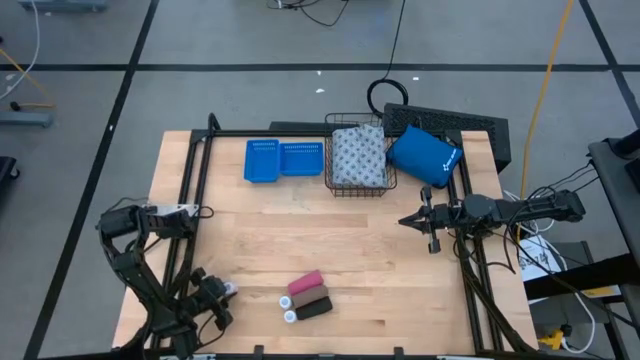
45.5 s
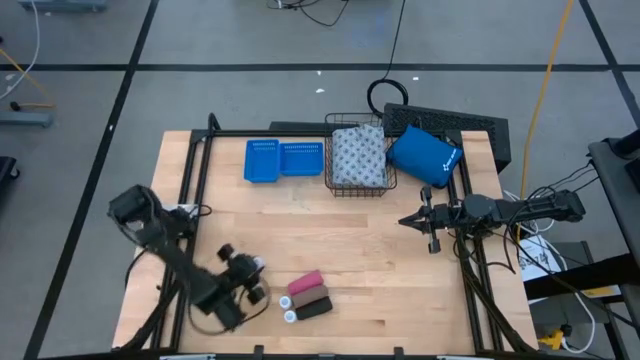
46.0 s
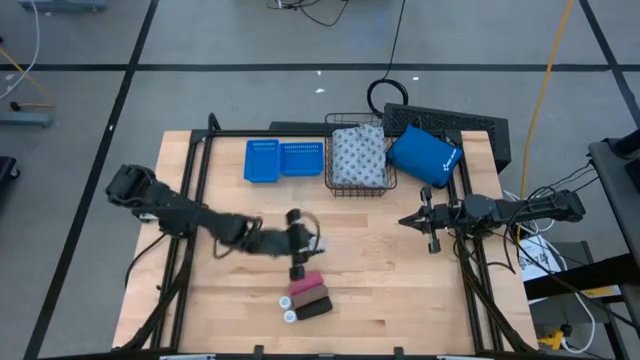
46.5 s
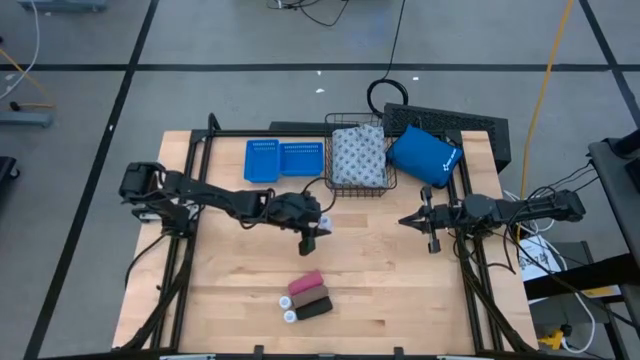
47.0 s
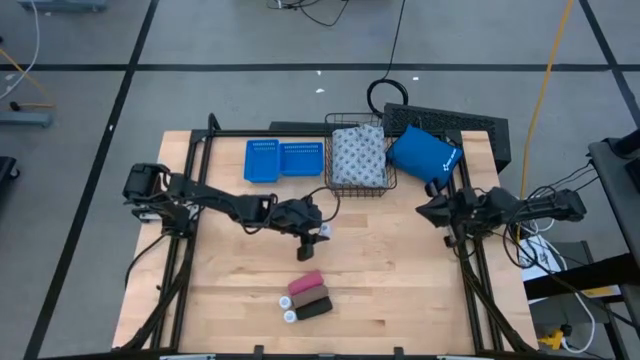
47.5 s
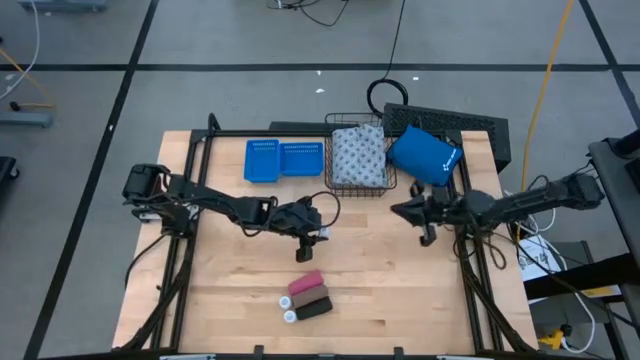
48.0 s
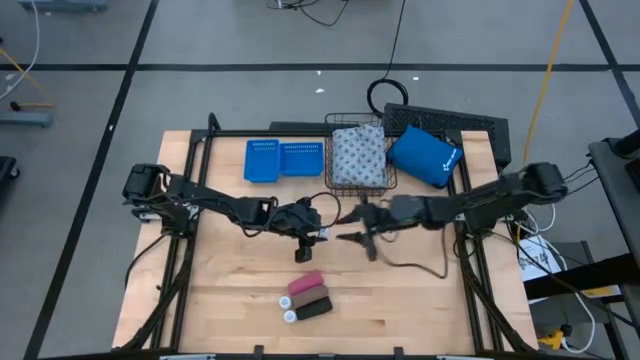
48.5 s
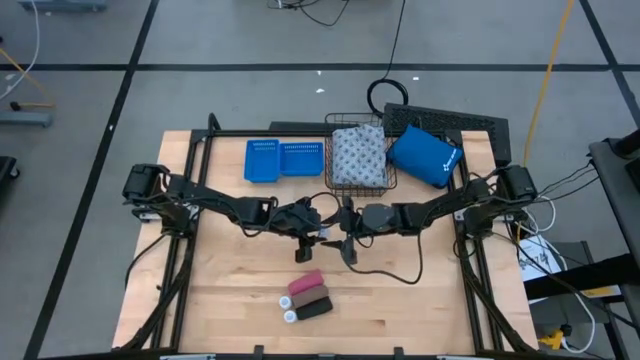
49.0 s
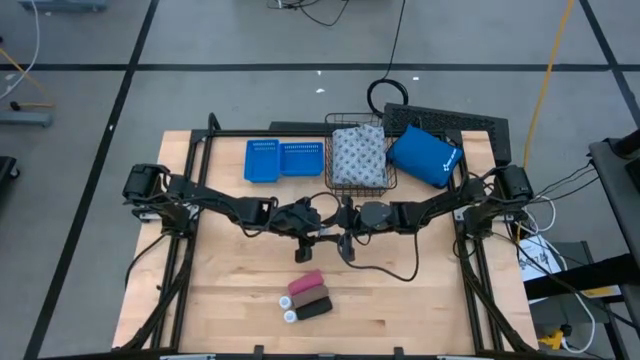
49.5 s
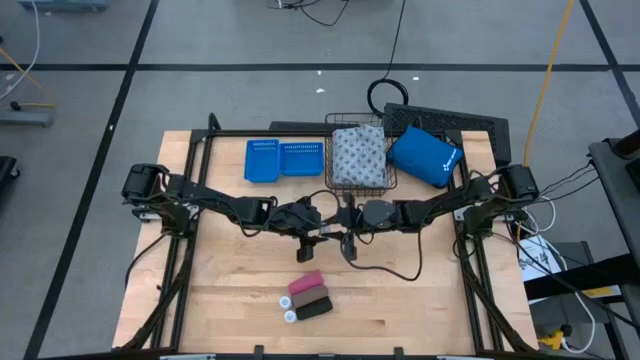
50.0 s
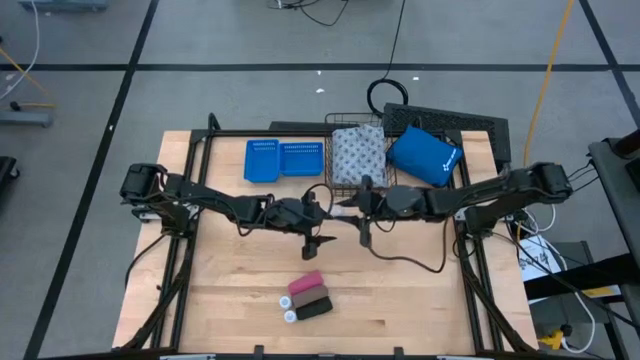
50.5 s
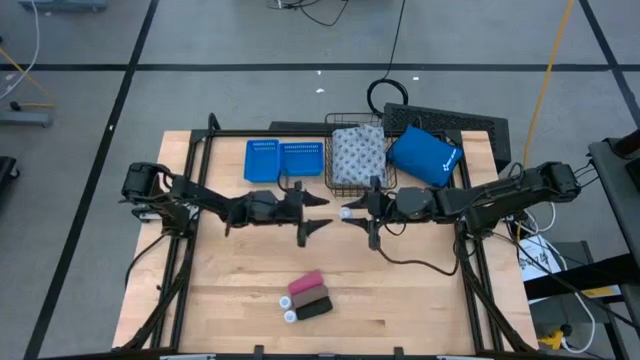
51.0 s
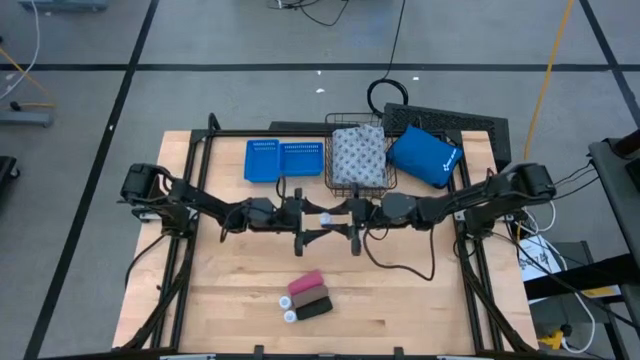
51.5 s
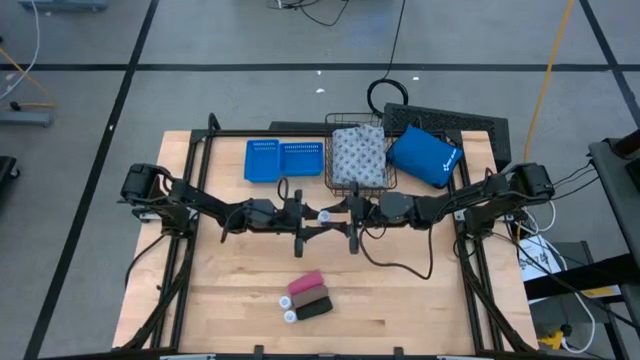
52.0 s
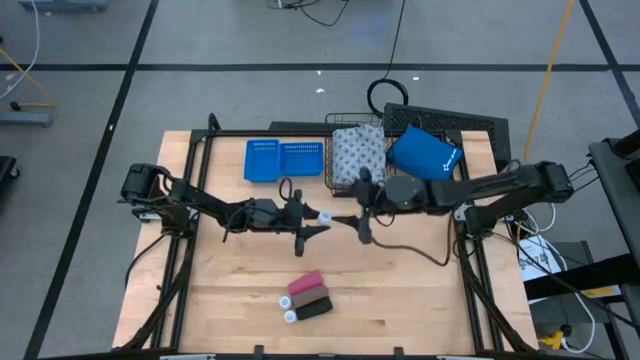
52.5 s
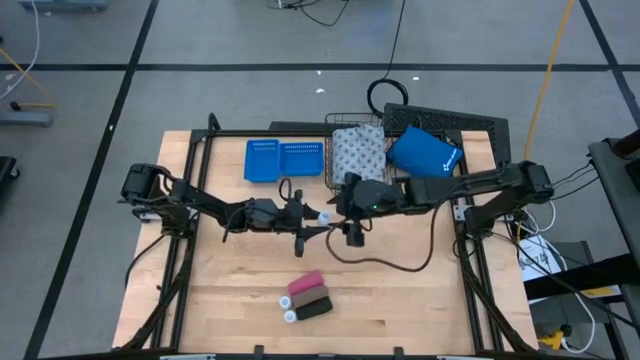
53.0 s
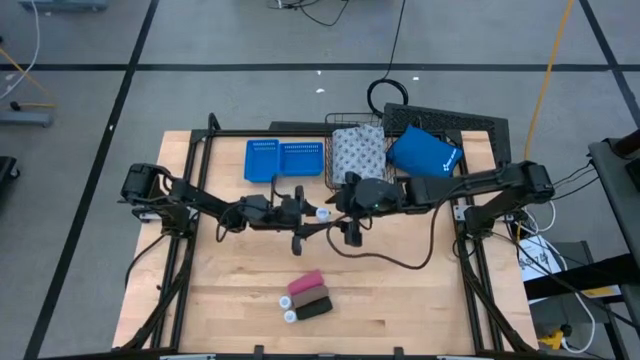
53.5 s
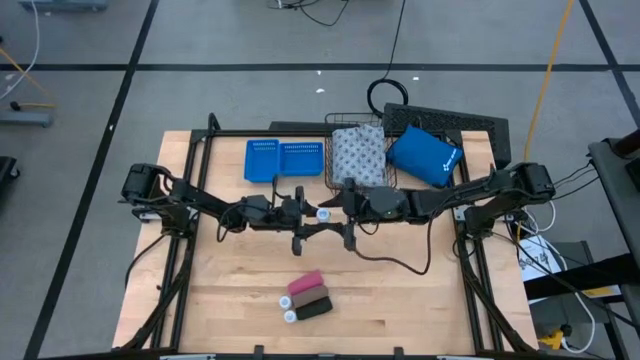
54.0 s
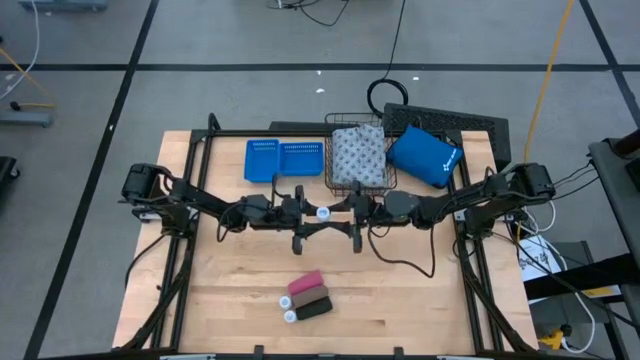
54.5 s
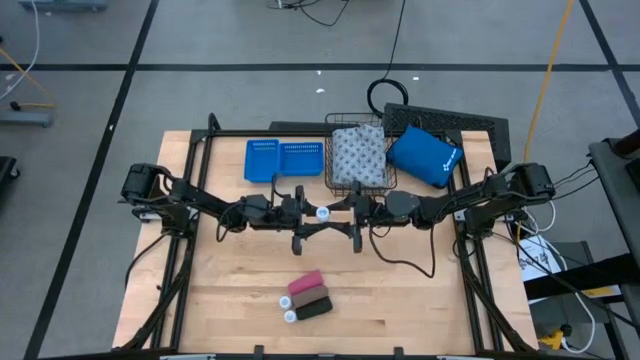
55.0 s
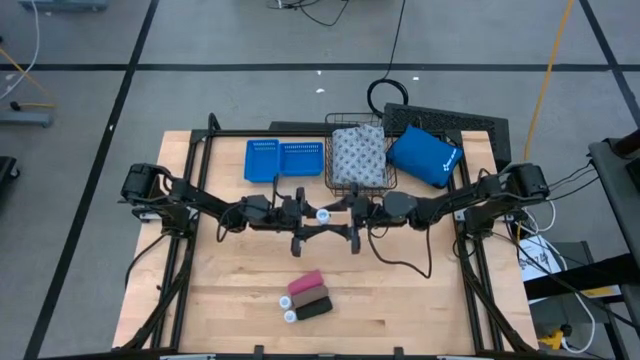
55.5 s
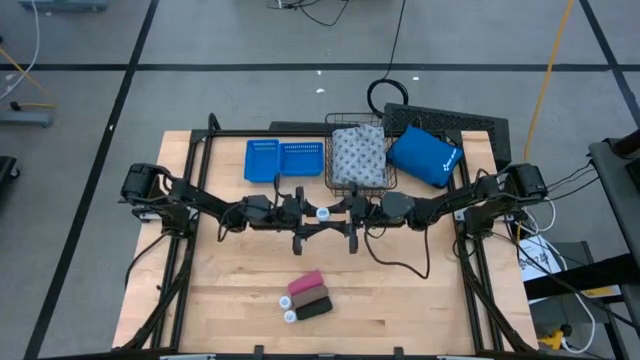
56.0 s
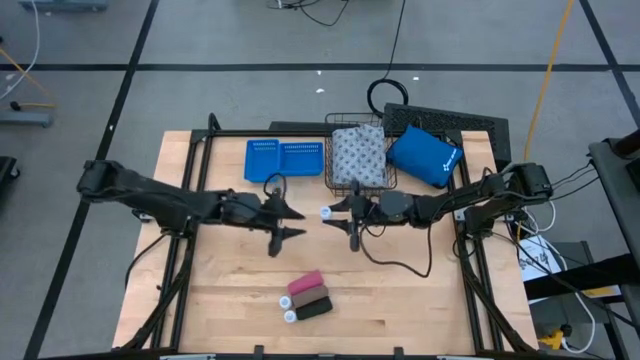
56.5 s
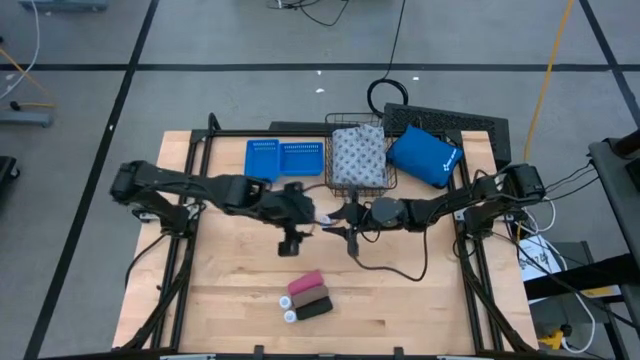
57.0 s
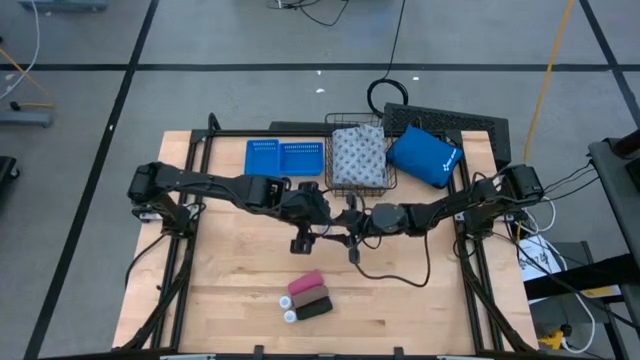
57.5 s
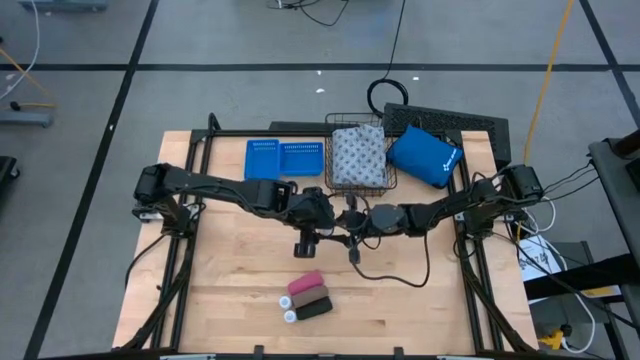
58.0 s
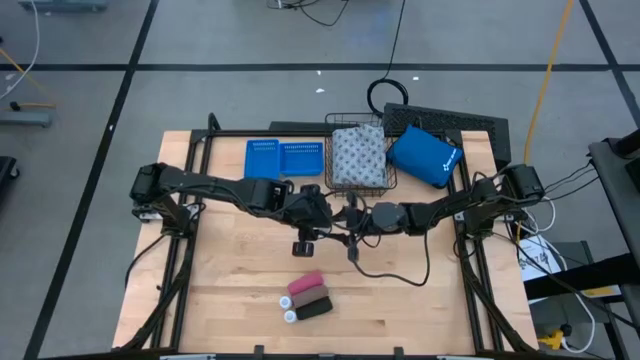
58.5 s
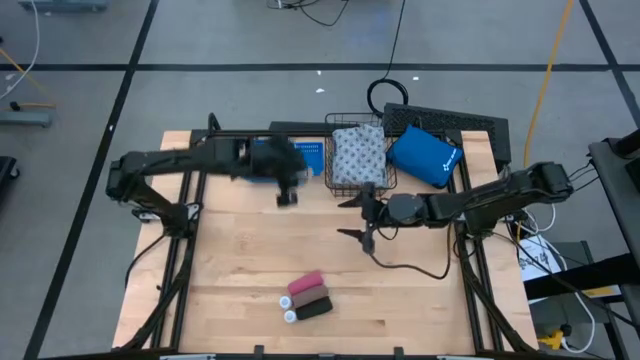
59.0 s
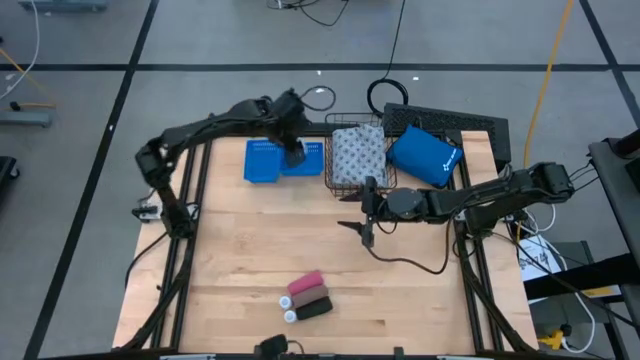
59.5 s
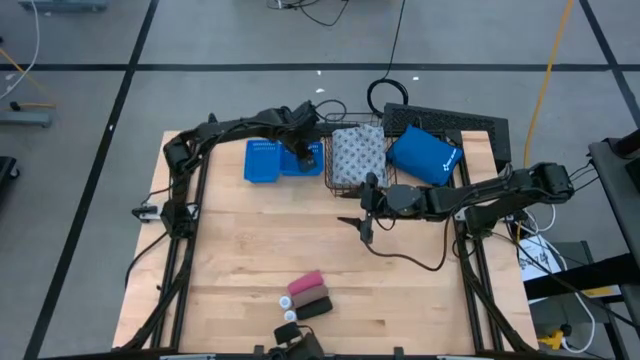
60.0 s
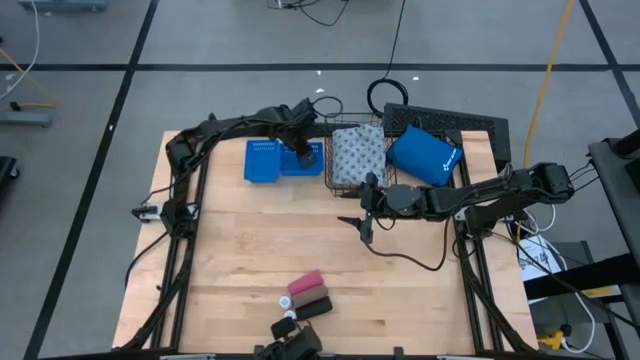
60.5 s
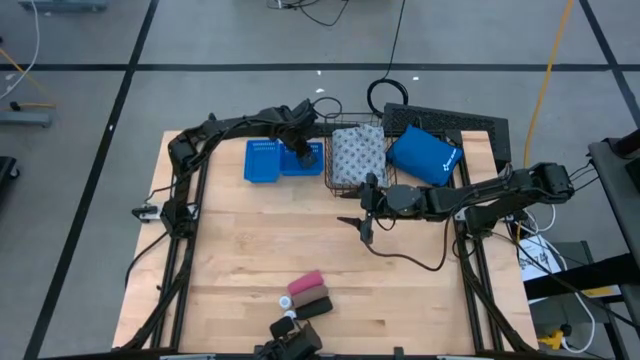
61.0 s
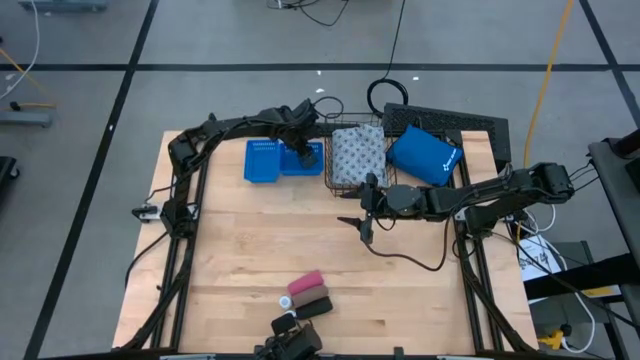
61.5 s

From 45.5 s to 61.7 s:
Task: Pick & Place Medicine items
Put the transparent pill bottle into the right blue bin

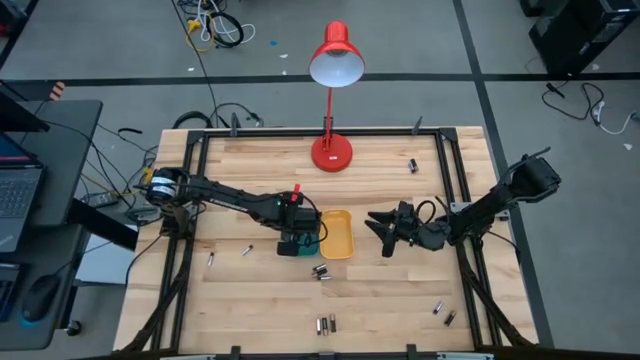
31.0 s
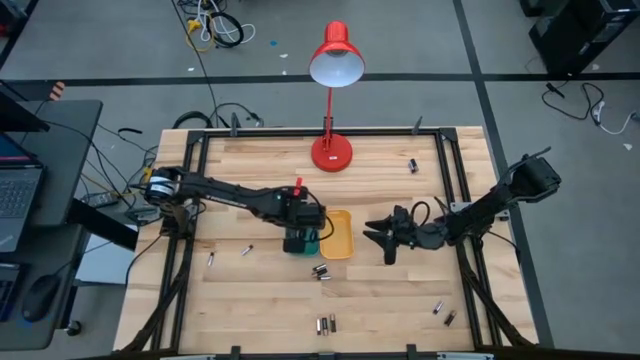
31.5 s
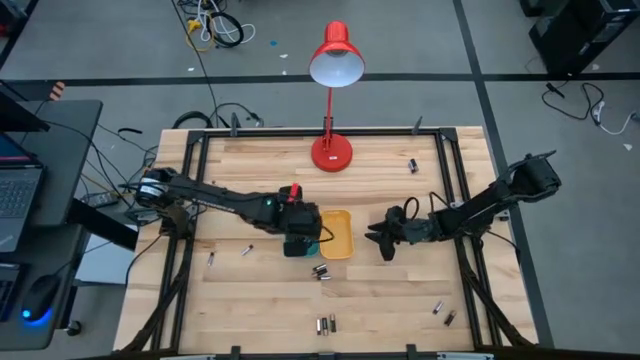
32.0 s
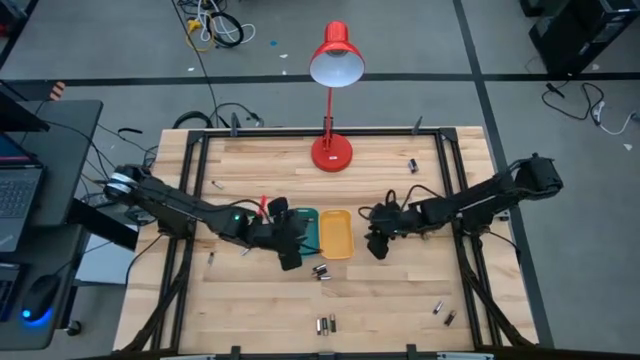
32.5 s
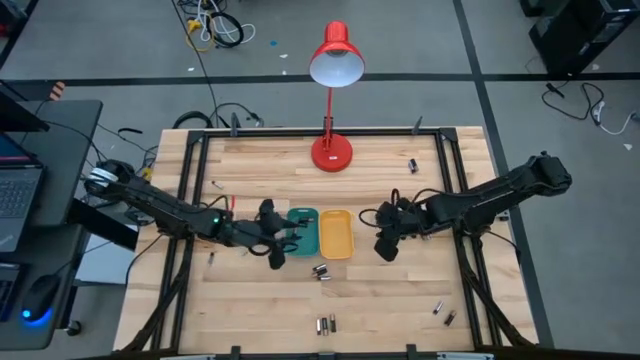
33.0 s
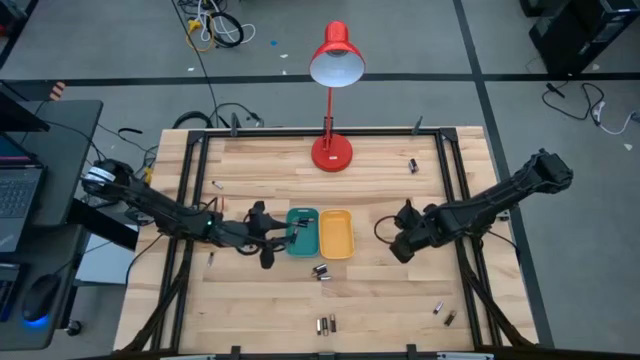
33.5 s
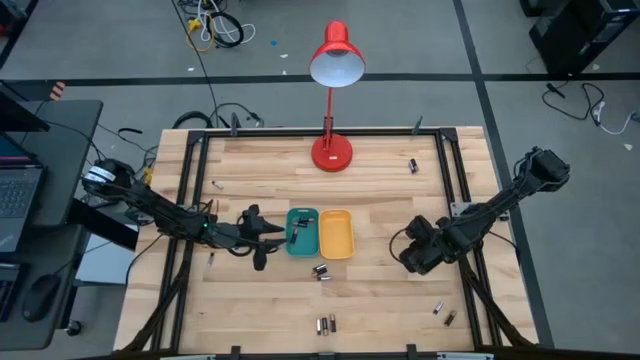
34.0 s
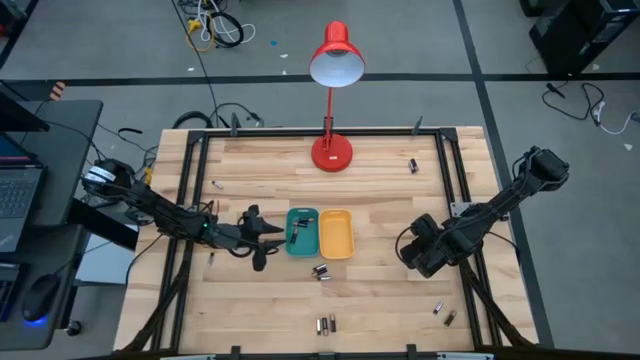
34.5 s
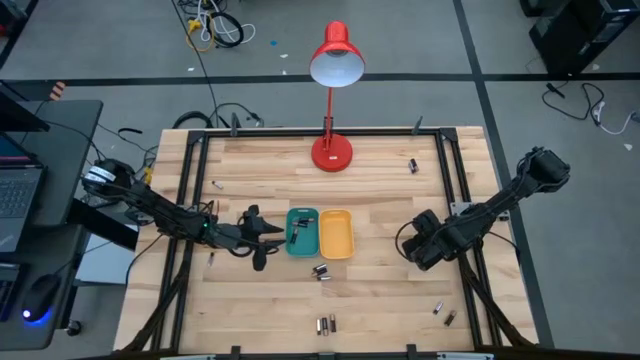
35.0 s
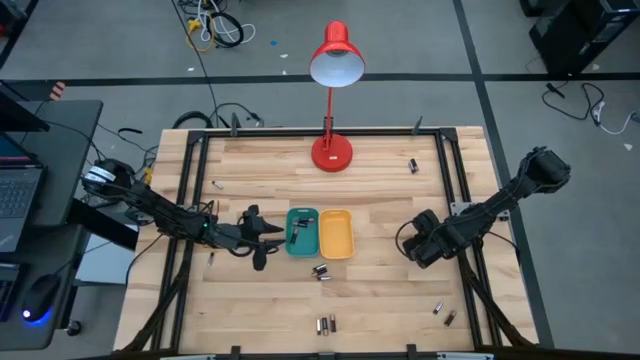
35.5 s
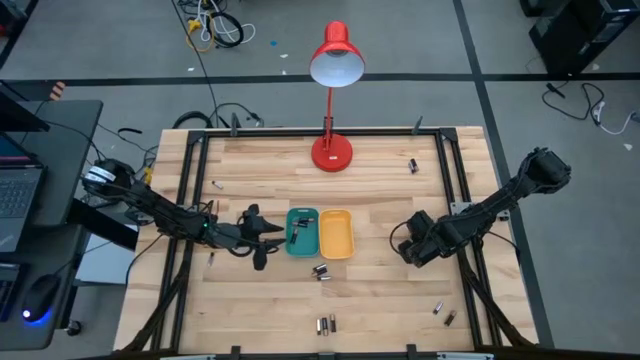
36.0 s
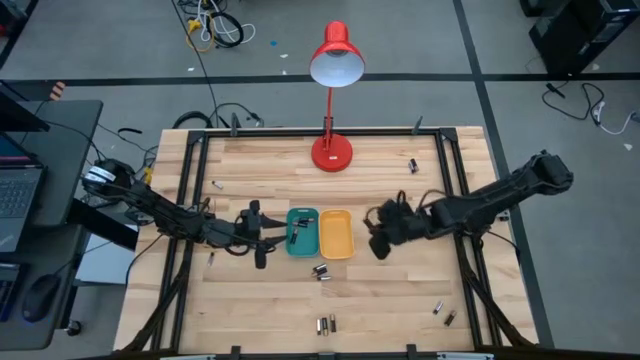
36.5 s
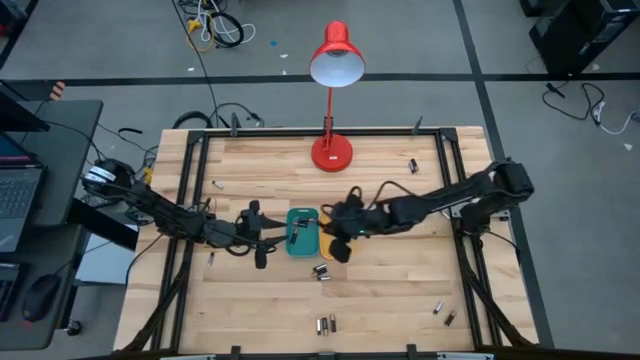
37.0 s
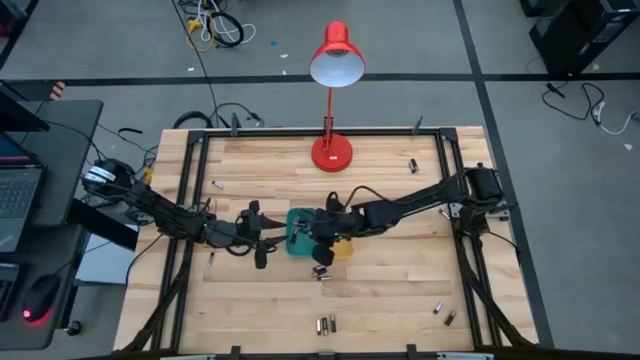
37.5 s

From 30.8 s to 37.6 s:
Task: Sort batteries
Put the black battery into the blue bin
